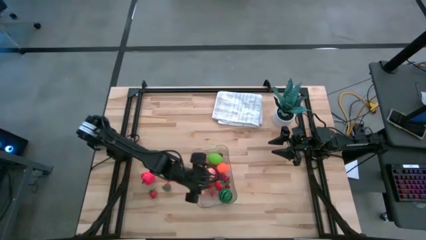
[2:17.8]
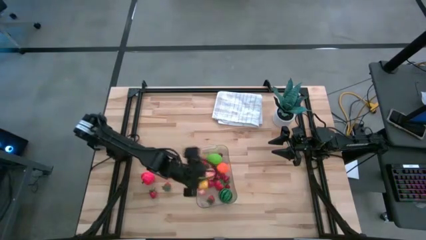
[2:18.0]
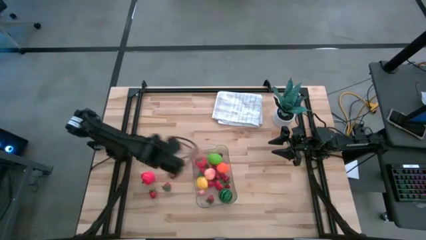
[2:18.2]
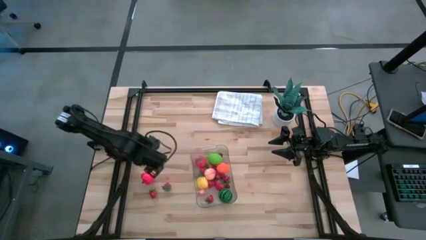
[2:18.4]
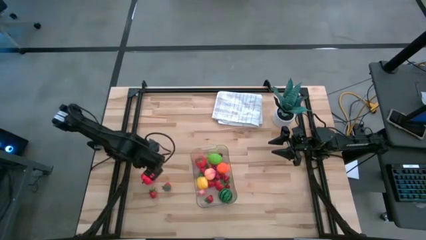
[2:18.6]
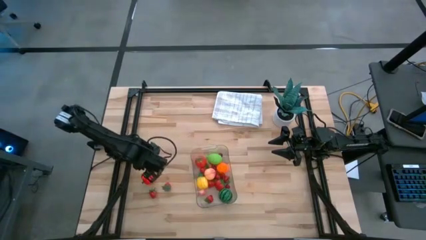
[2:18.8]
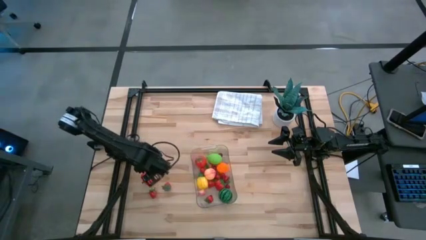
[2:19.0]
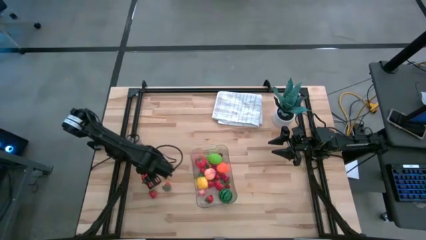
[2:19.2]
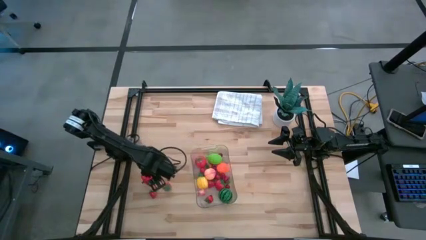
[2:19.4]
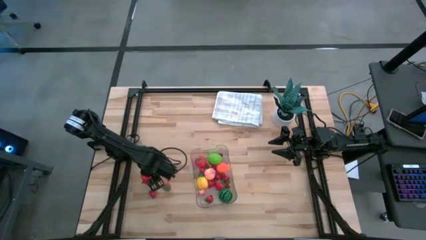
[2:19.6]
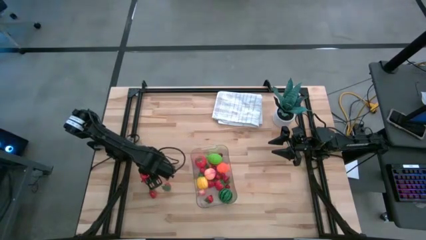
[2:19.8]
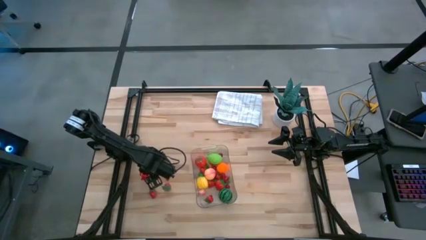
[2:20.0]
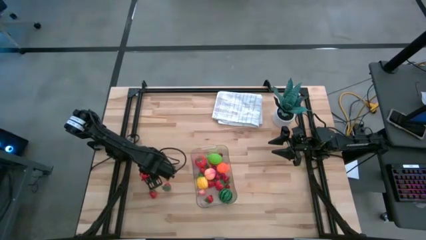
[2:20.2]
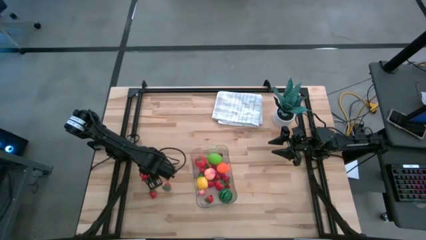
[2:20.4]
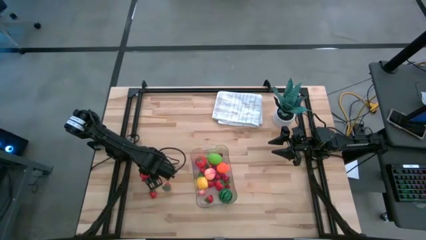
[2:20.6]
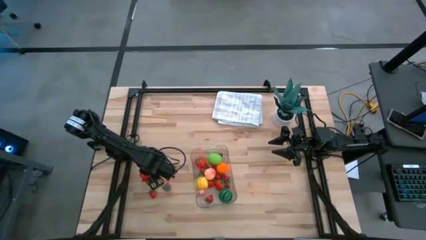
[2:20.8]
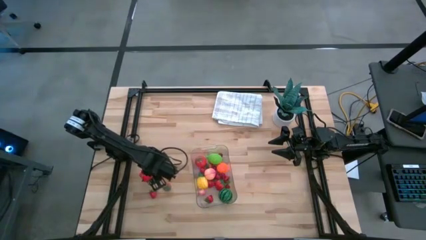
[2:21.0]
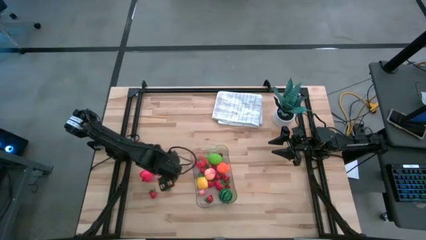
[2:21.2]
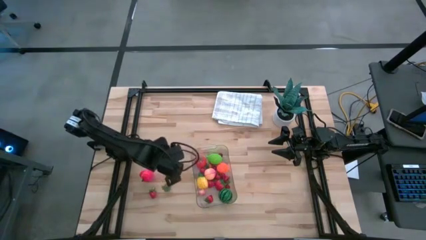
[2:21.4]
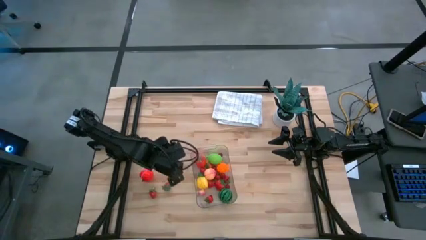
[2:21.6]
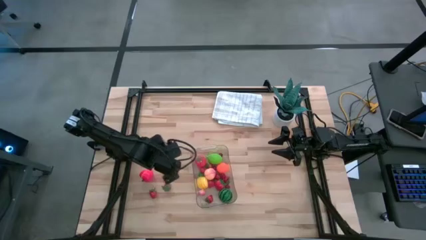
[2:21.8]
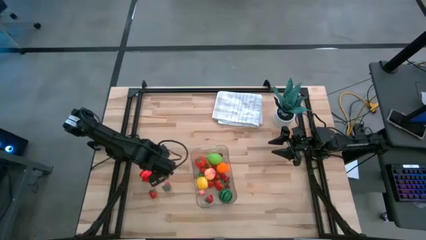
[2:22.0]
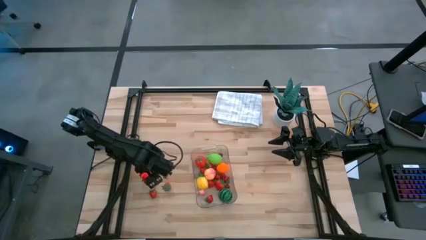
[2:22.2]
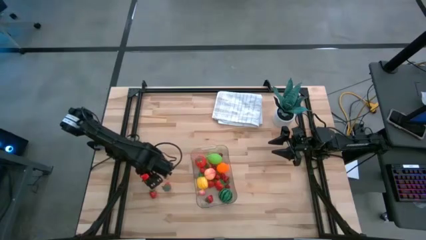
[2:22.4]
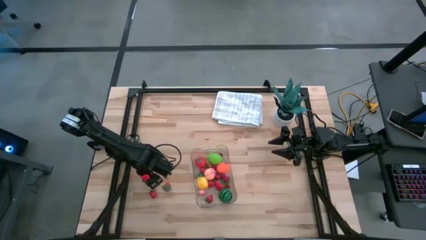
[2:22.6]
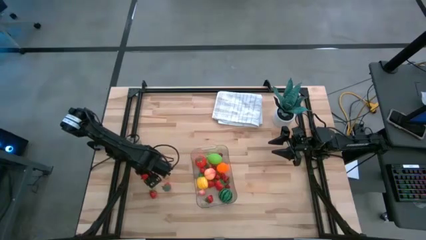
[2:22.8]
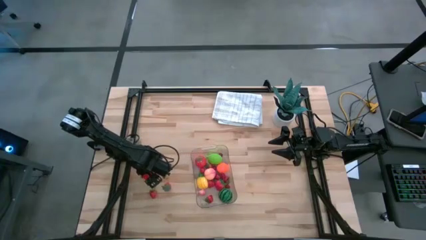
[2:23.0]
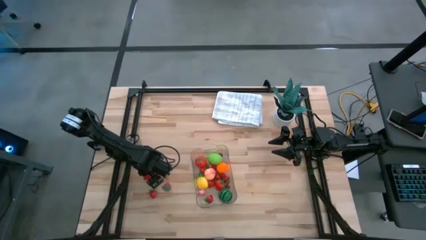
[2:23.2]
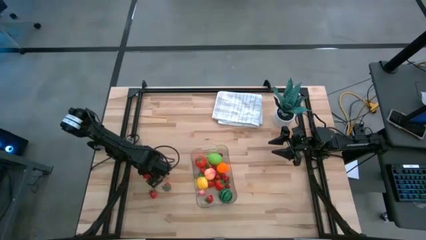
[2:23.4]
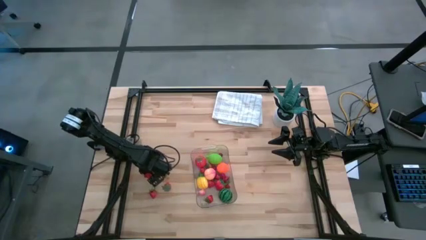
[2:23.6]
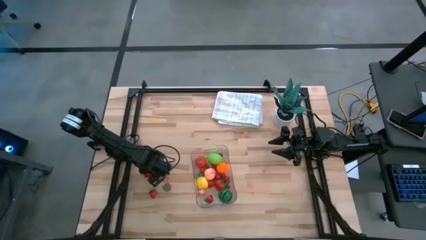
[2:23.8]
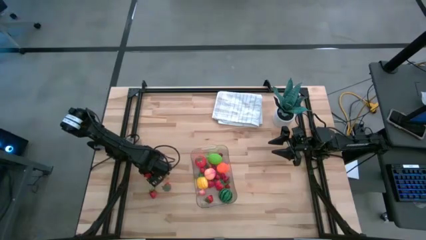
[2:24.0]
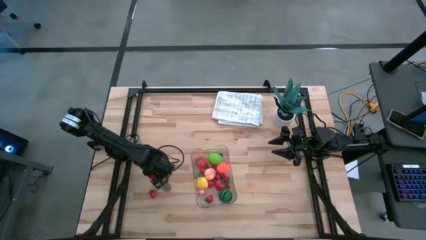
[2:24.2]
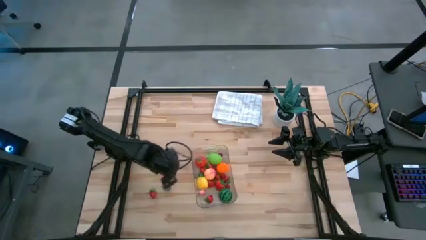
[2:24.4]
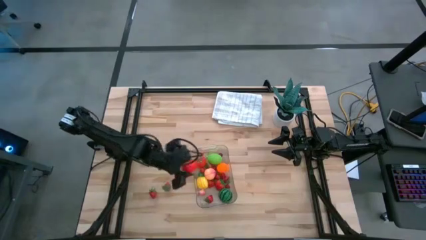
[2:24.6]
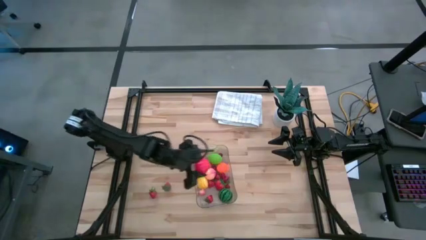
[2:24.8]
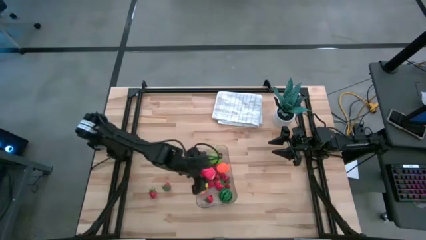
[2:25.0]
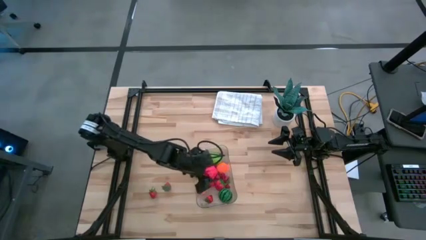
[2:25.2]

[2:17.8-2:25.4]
Task: Pick and placing Produce into tupperware
Put the orange tomato into the transparent bin

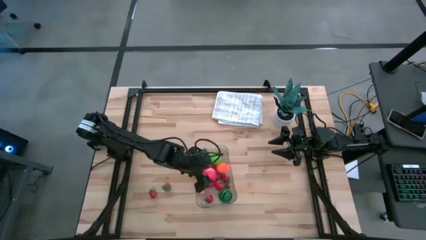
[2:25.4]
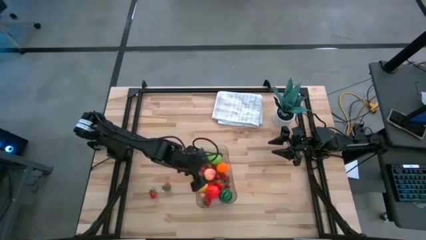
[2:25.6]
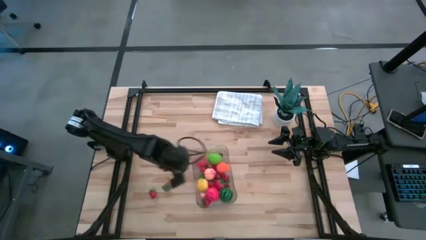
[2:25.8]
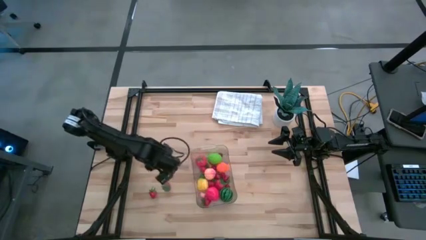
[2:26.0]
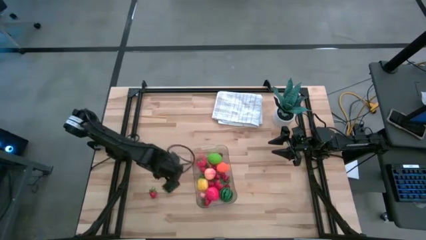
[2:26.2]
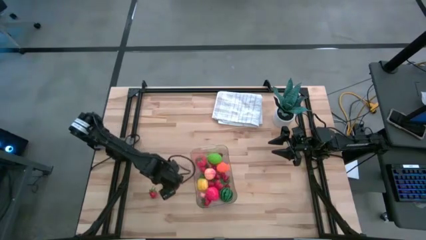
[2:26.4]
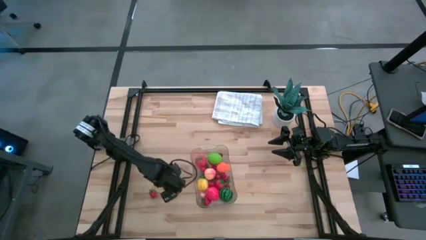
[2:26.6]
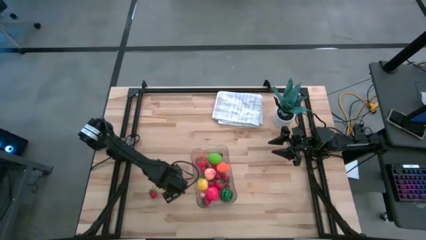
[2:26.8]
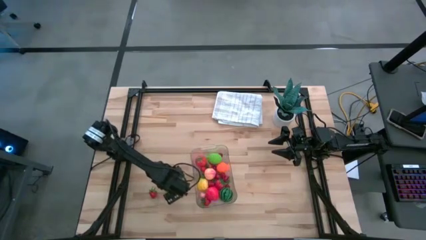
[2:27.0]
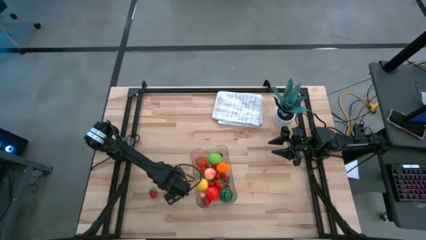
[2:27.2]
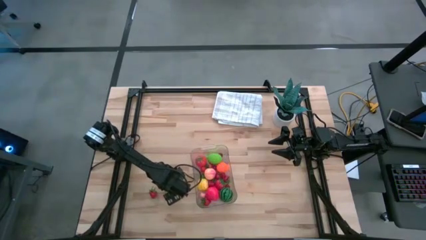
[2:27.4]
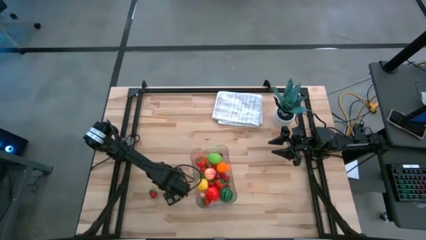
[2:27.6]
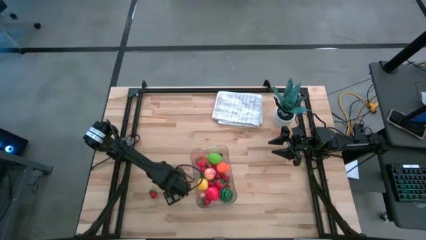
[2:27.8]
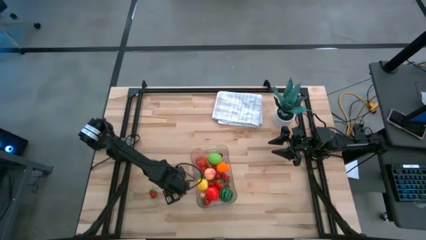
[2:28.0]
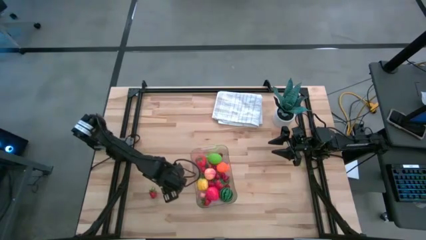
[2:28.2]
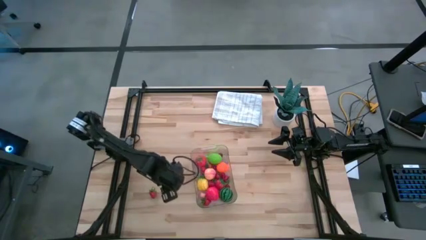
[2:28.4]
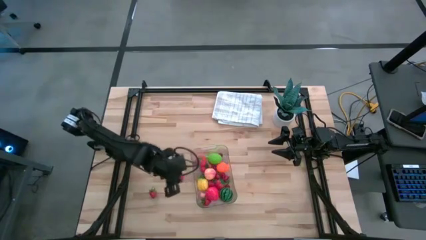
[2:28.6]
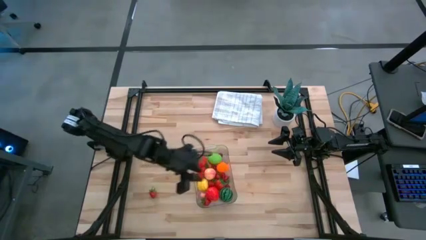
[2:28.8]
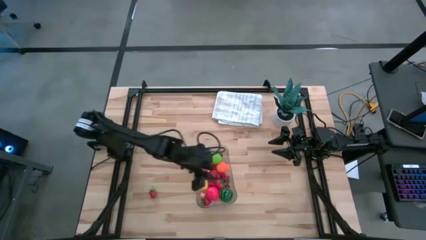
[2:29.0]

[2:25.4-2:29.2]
Put the red strawberry into the transparent bin

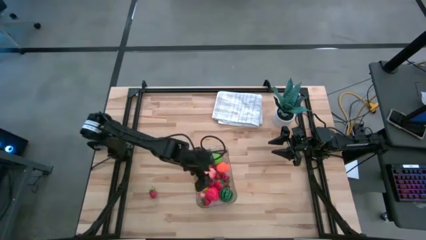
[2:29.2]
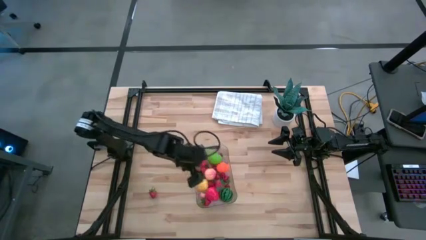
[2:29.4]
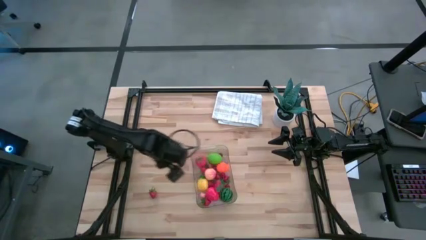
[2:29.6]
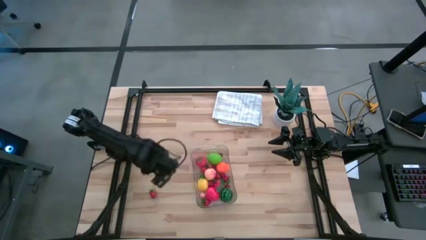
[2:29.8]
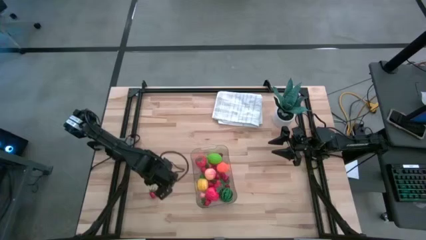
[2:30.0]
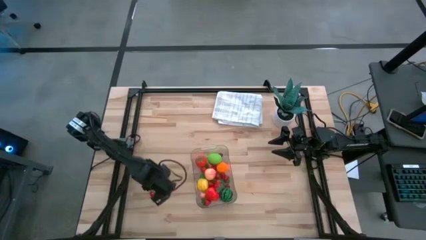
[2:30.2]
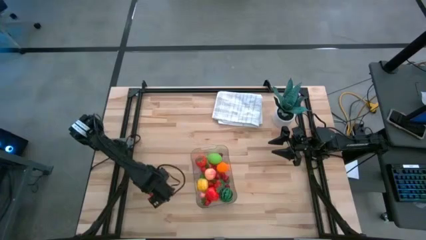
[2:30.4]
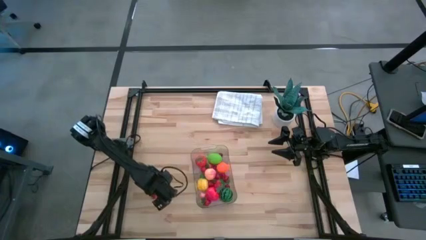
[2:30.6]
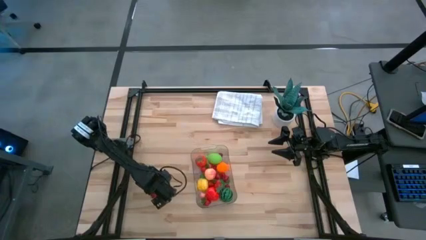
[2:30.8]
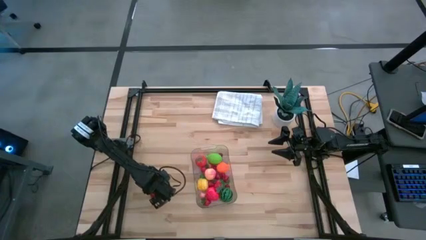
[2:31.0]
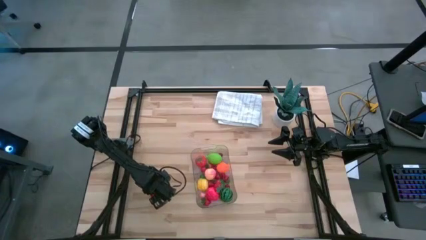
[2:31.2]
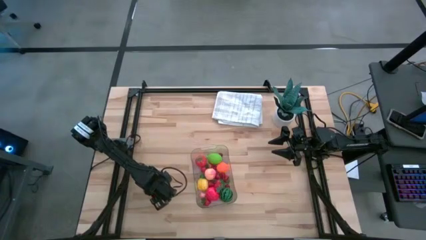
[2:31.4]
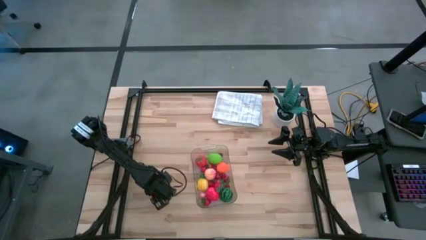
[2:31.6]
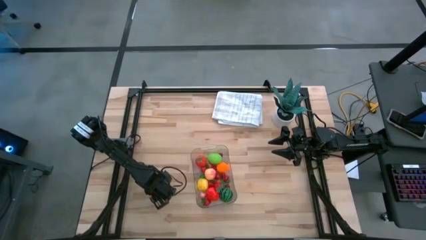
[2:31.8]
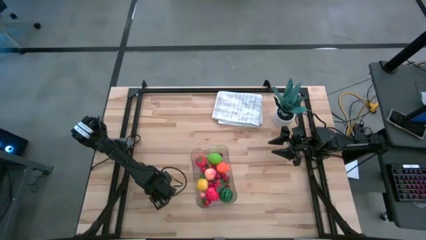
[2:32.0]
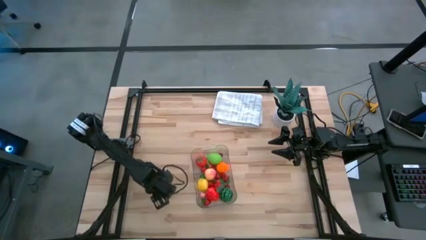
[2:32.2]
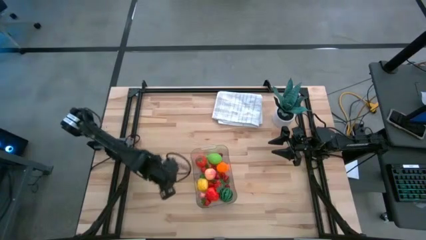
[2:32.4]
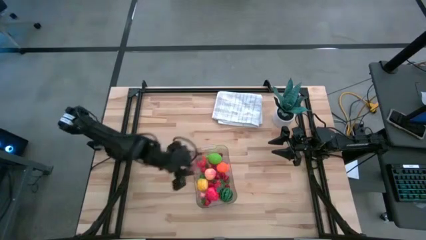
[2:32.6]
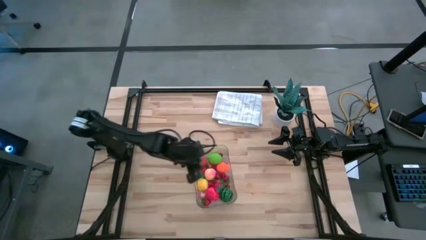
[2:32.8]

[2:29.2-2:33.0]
Put the red strawberry into the transparent bin

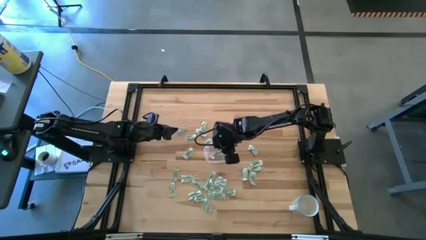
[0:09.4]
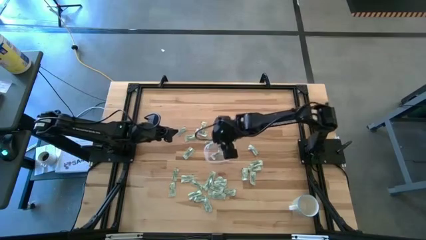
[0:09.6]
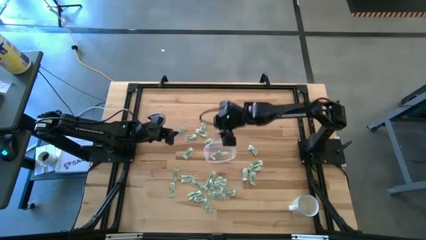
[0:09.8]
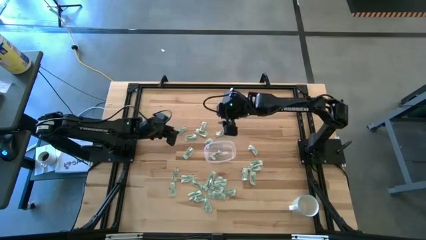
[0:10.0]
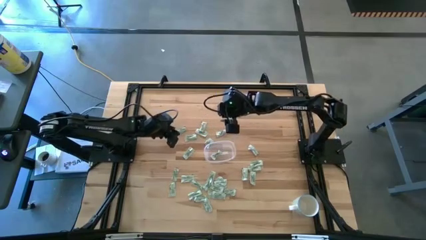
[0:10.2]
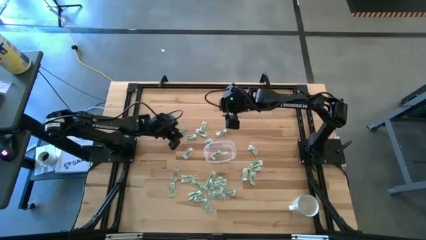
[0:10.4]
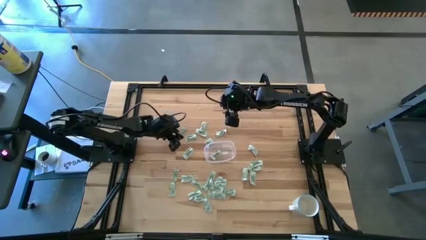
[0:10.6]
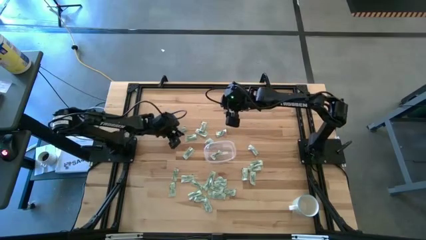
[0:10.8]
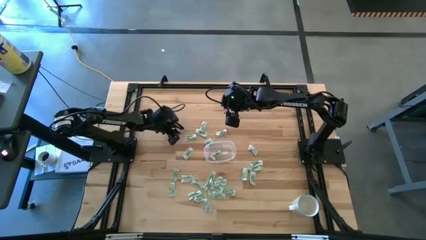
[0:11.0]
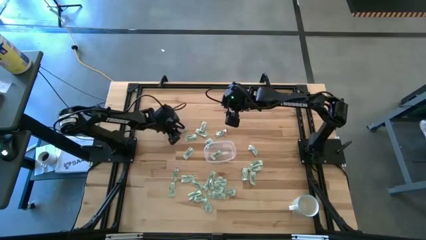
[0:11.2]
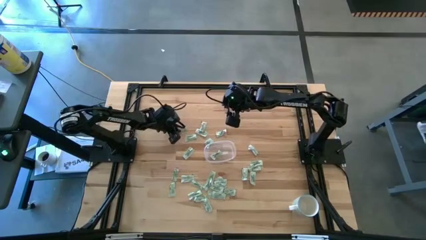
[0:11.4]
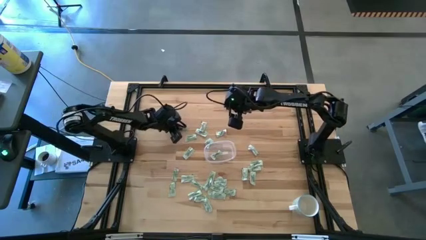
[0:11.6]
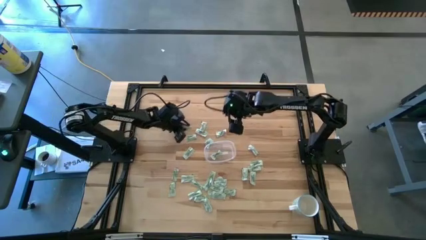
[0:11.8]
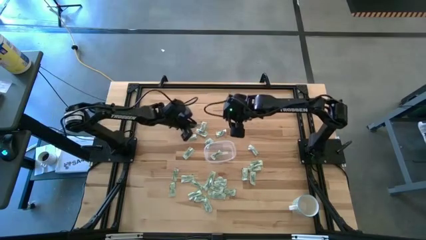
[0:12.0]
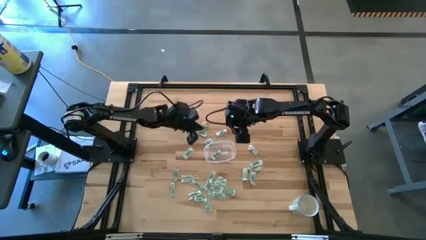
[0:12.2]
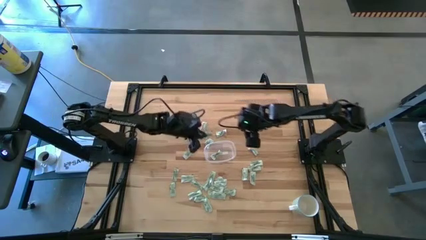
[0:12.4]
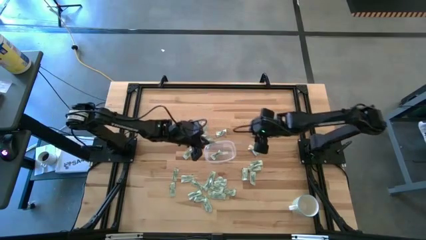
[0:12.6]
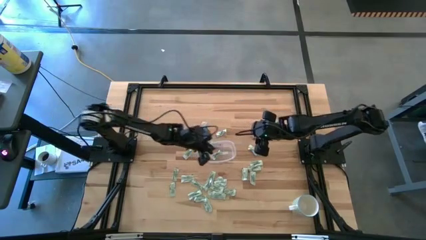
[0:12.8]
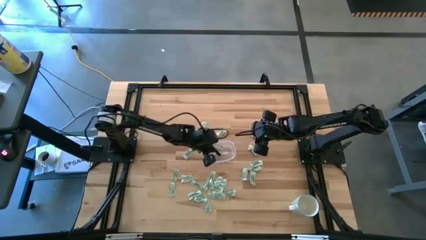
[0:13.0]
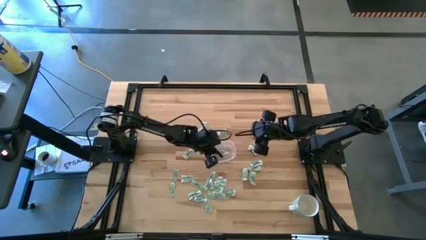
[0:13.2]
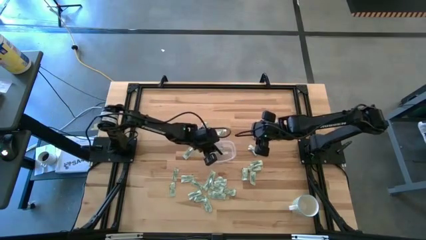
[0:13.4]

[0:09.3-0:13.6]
Task: Pick and place Stevia / Truvia into bins
Put the stevia packet into the transparent container
